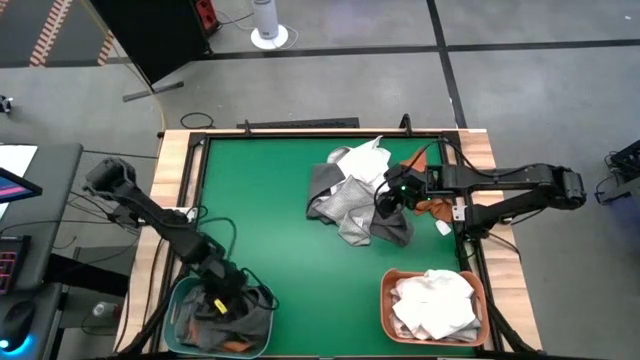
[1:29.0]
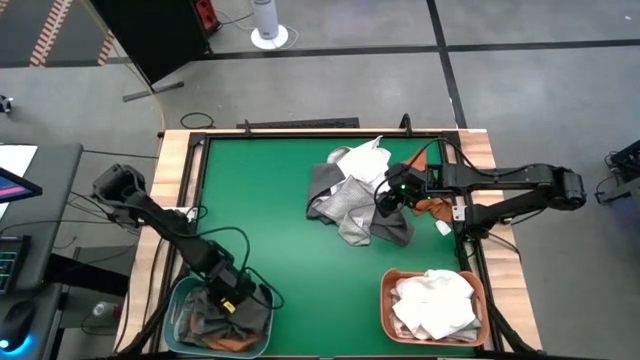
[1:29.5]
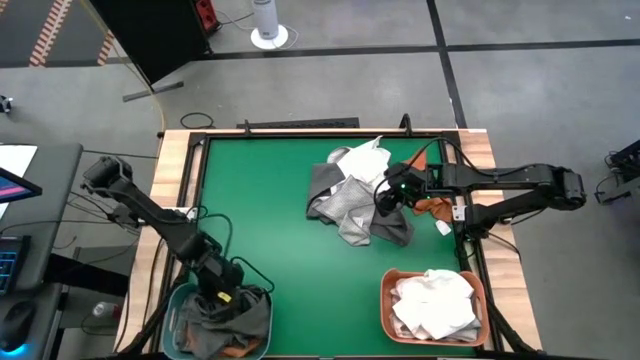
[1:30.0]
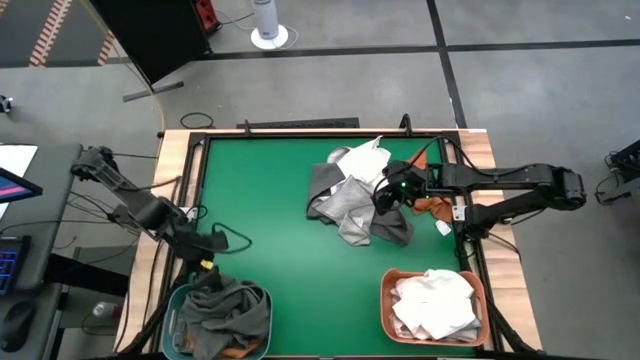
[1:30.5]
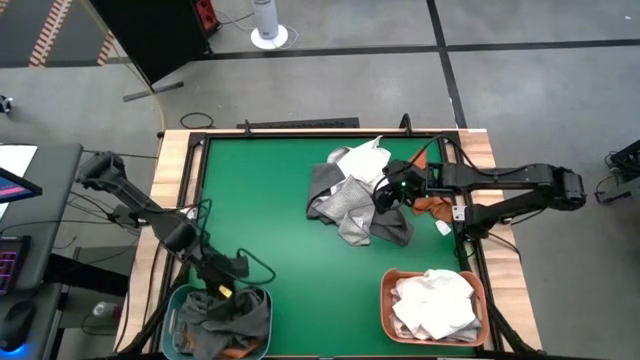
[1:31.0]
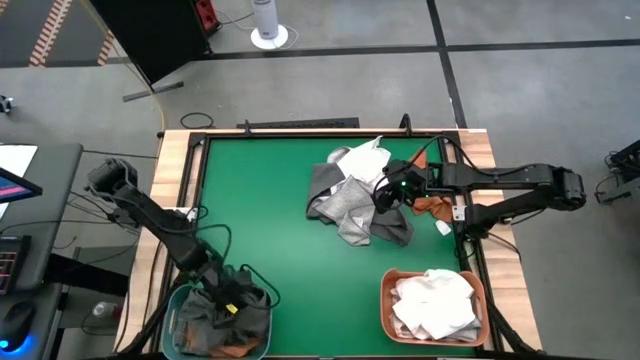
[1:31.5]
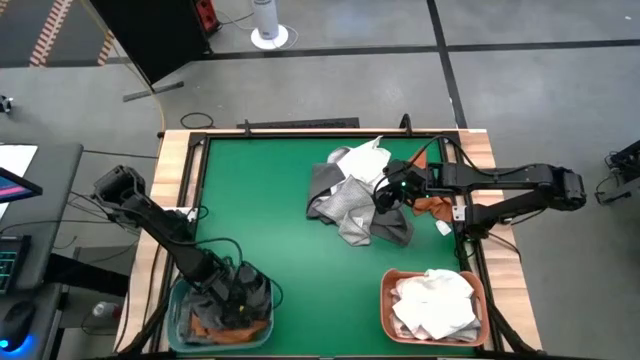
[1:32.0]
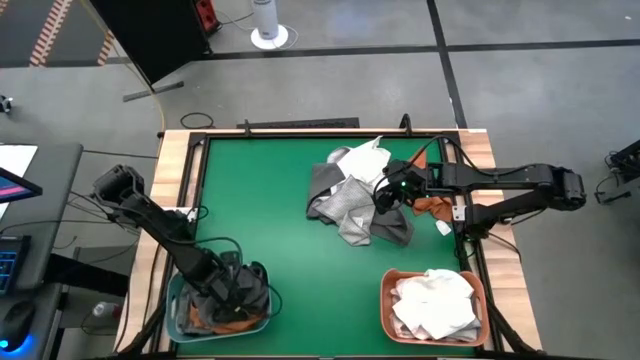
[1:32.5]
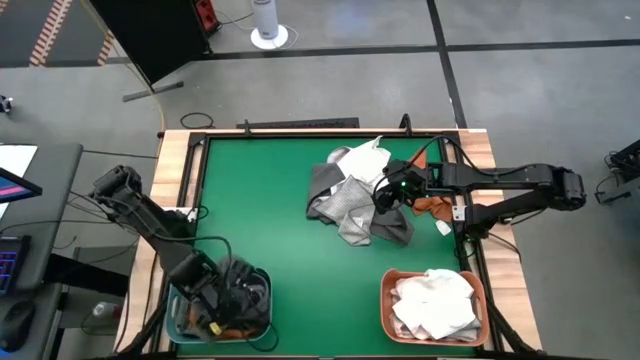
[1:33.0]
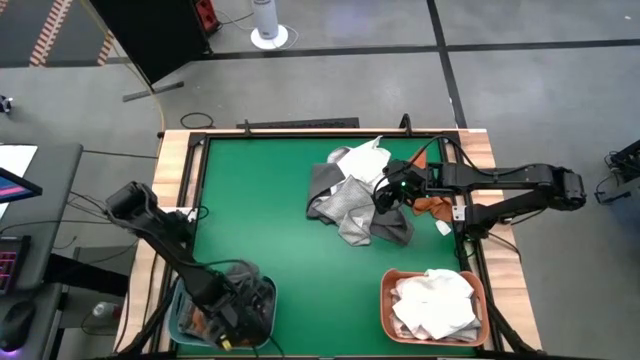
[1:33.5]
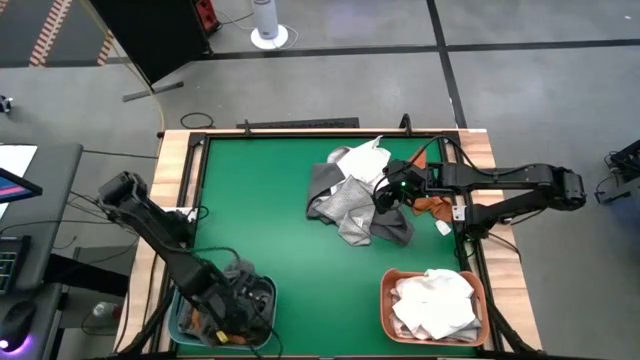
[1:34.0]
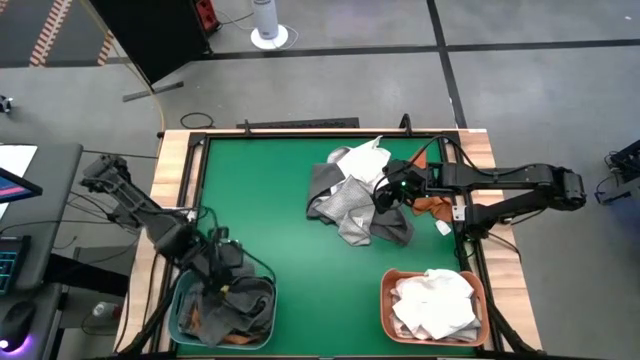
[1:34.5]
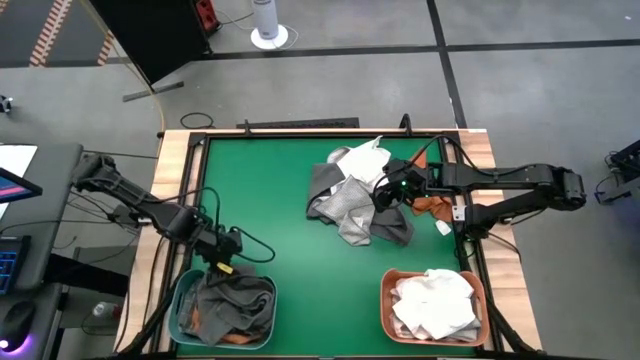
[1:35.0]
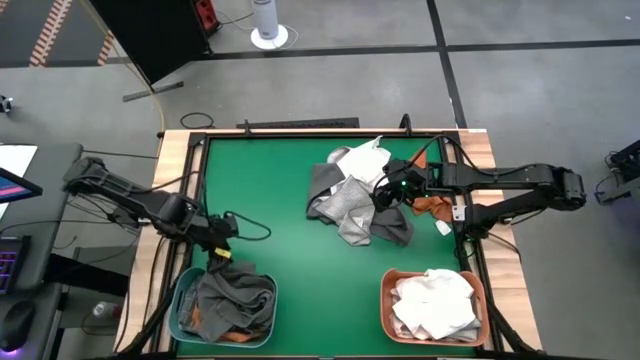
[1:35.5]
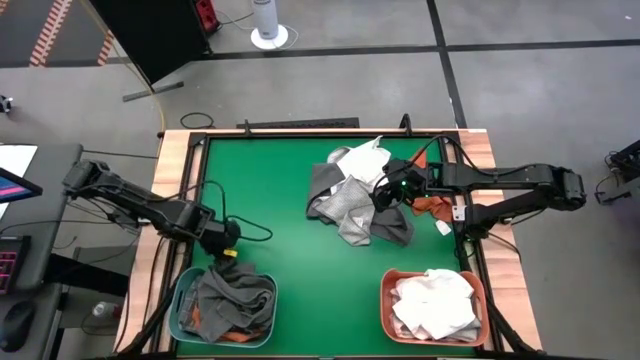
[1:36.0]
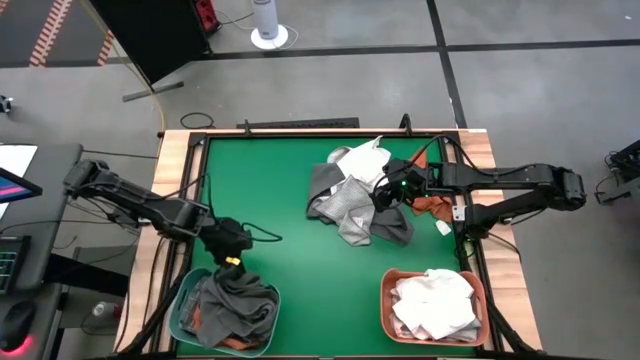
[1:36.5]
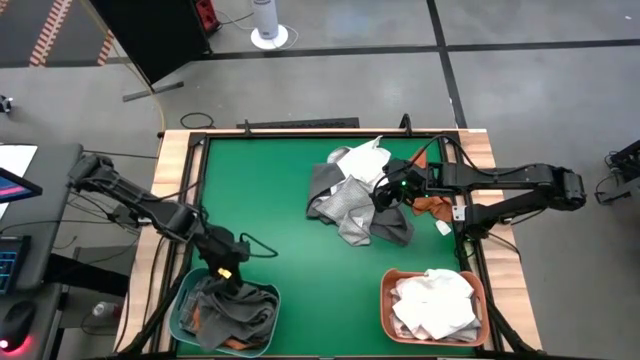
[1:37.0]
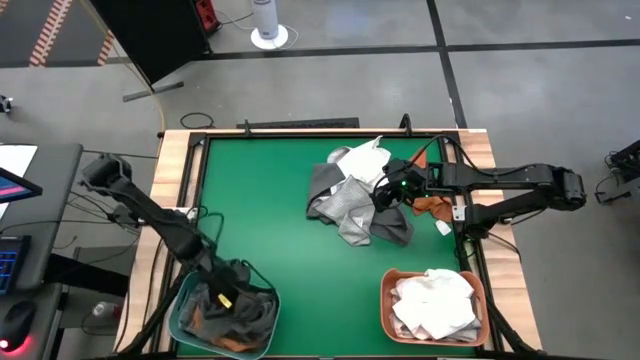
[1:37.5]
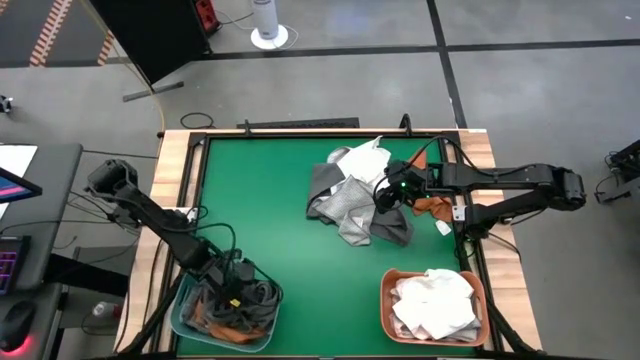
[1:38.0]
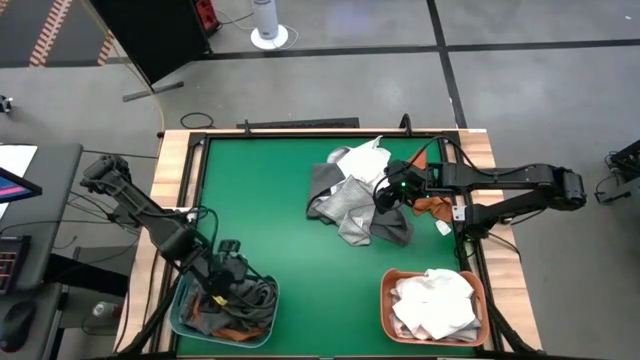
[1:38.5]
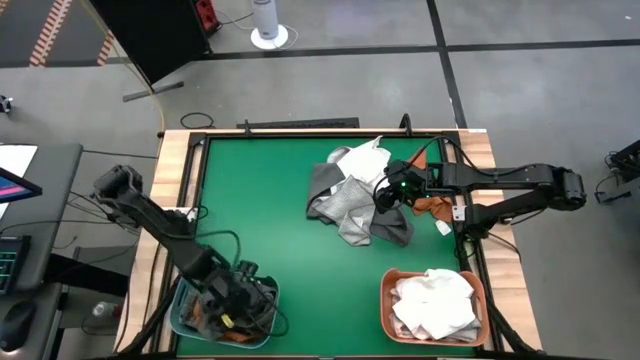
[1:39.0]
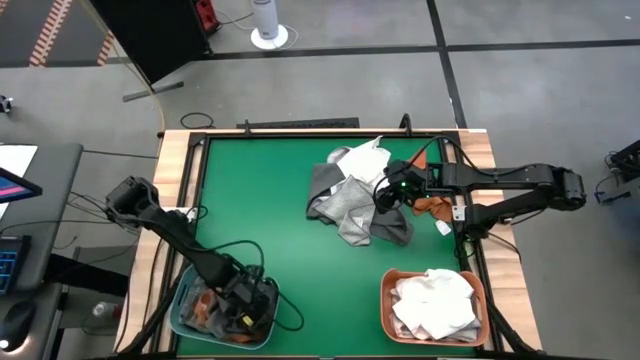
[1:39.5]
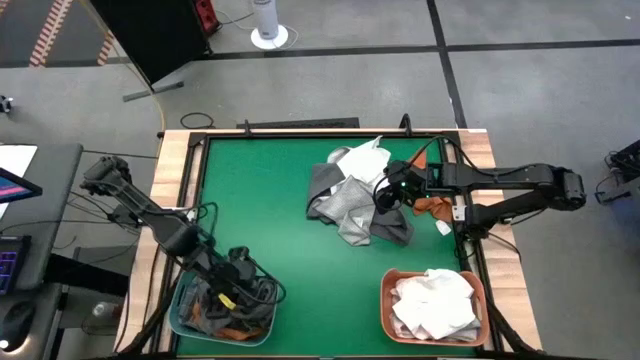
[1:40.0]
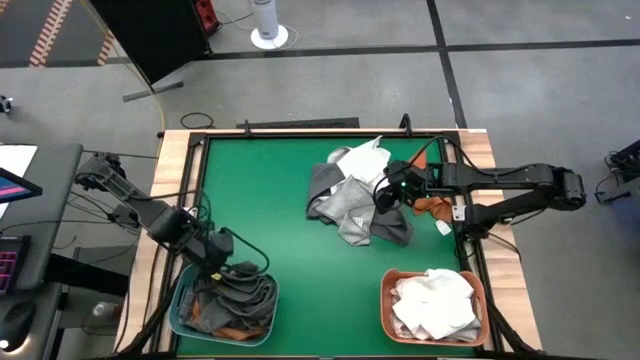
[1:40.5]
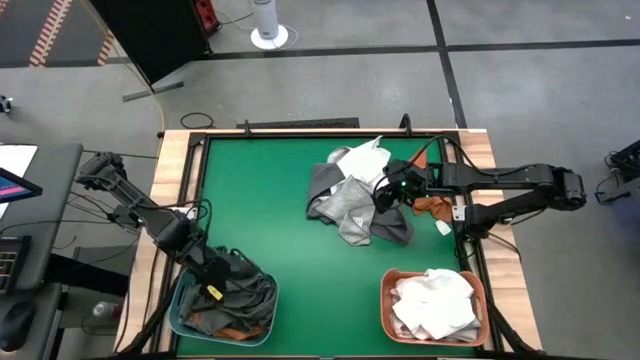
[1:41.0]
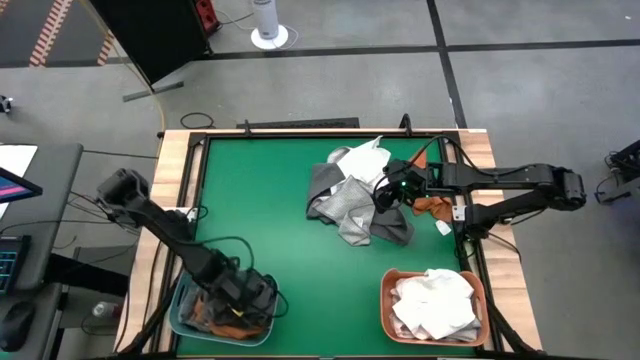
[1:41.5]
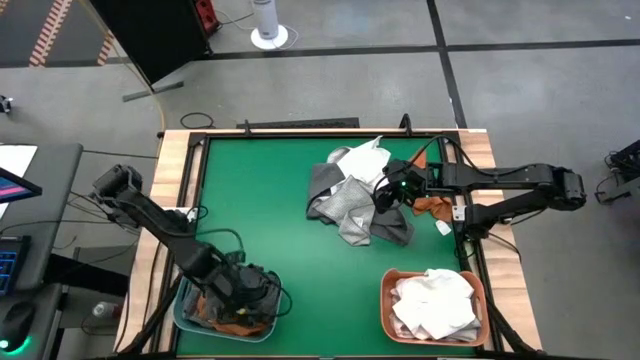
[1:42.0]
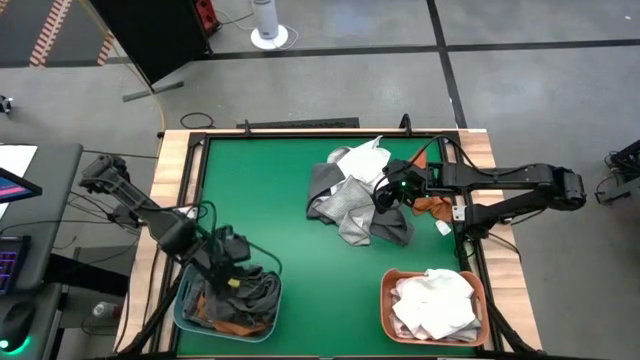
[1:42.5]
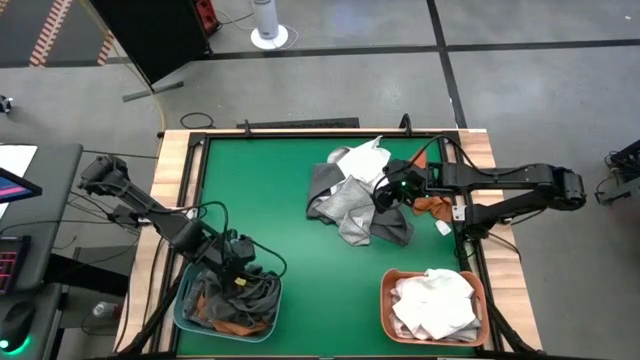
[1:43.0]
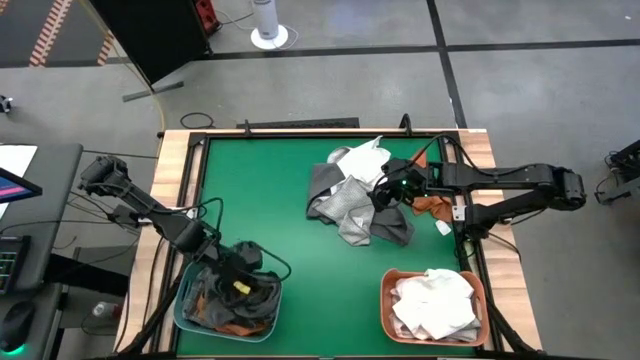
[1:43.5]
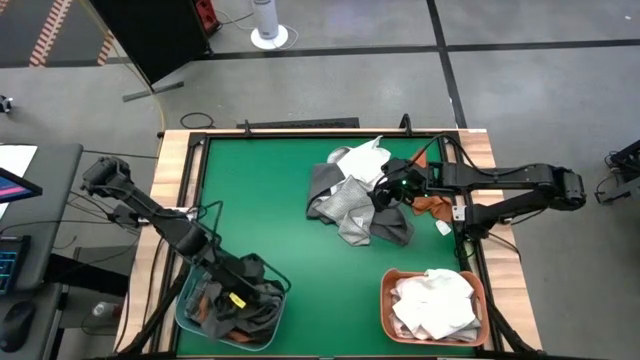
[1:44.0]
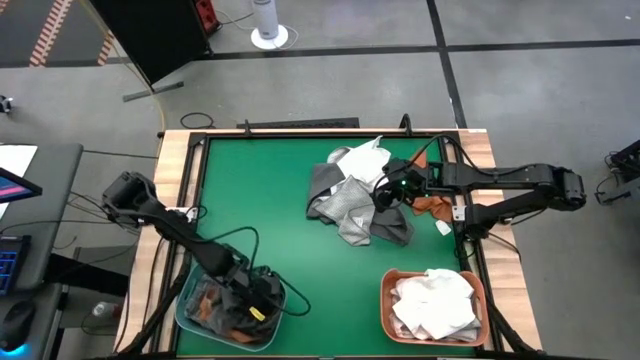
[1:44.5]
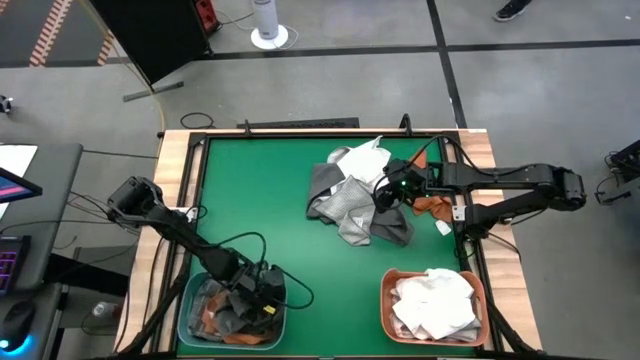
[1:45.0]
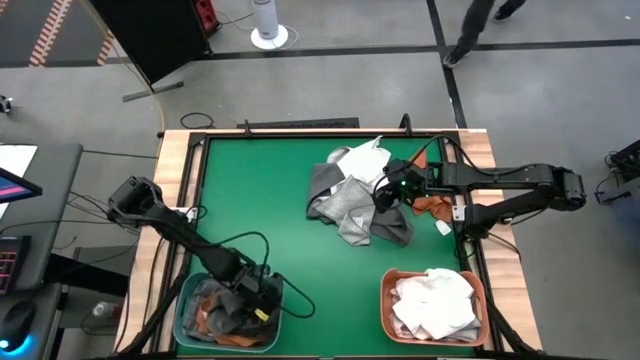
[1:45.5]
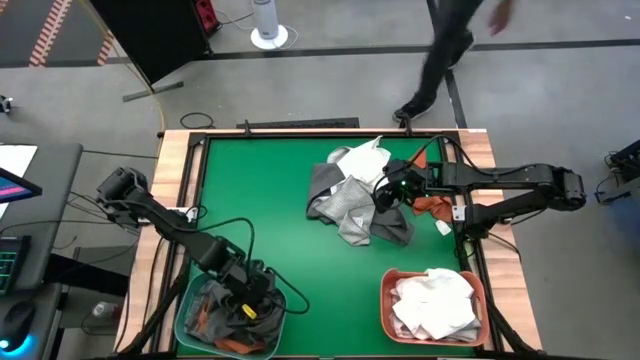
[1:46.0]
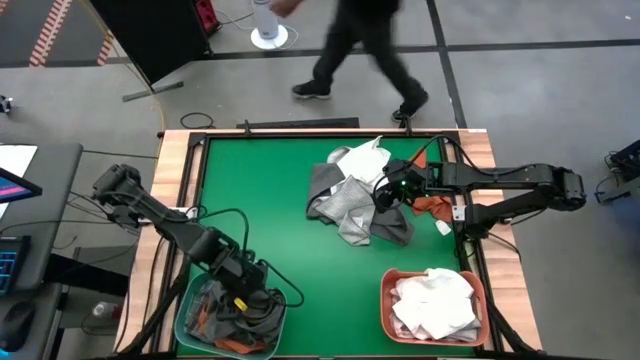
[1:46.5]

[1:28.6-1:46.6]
Task: Sort towels by color in basket
Put the left gray towel into the green bin
